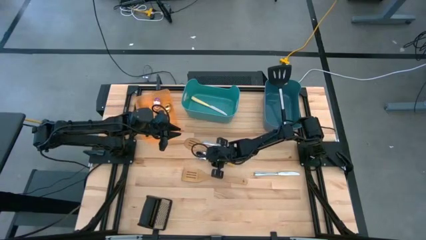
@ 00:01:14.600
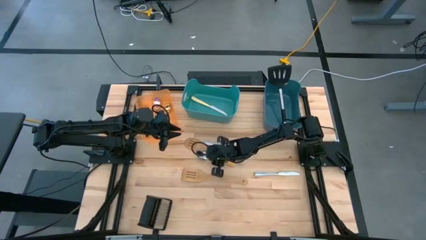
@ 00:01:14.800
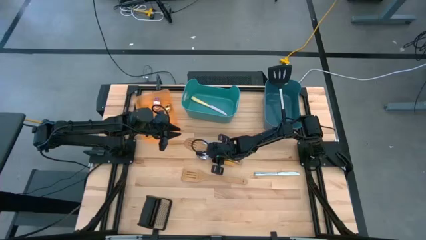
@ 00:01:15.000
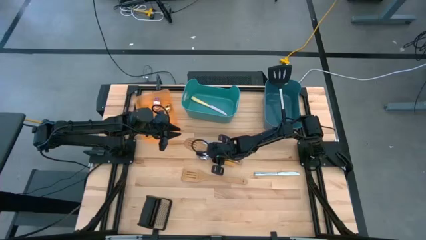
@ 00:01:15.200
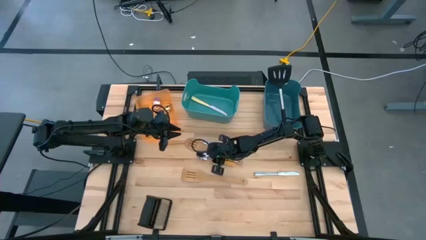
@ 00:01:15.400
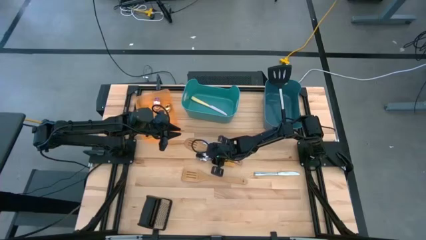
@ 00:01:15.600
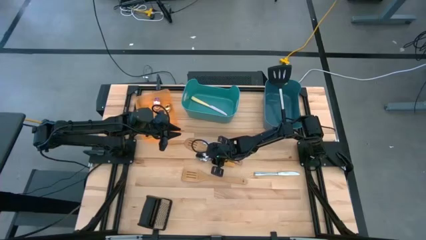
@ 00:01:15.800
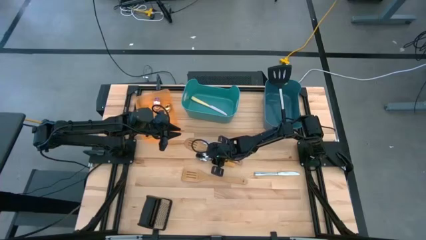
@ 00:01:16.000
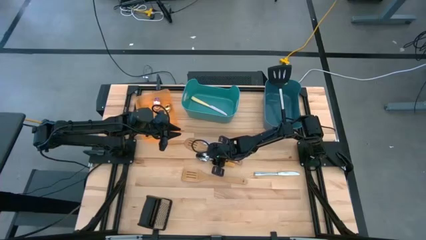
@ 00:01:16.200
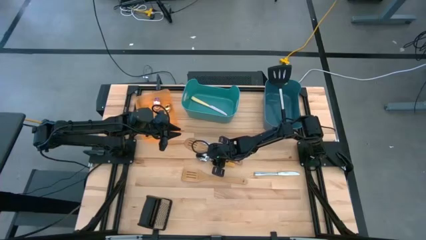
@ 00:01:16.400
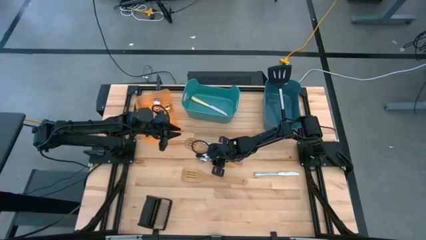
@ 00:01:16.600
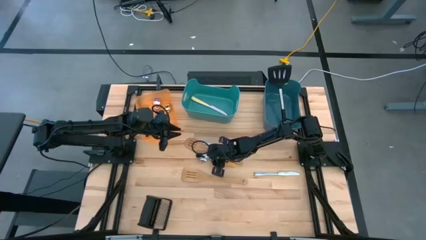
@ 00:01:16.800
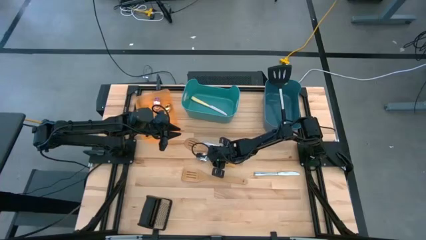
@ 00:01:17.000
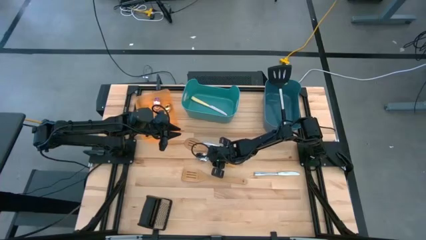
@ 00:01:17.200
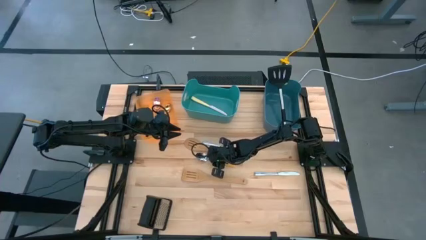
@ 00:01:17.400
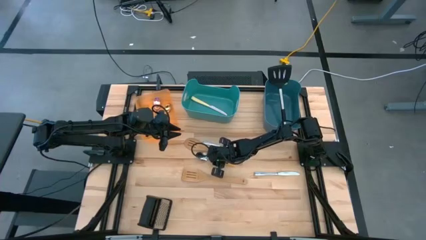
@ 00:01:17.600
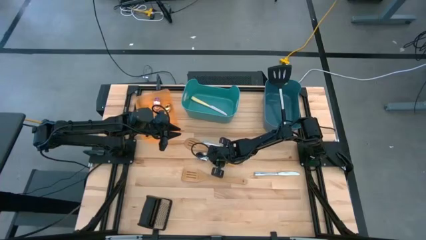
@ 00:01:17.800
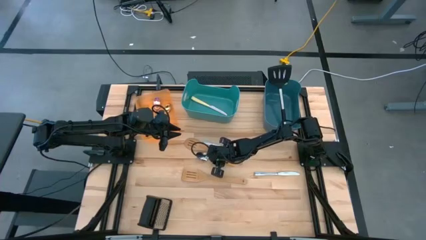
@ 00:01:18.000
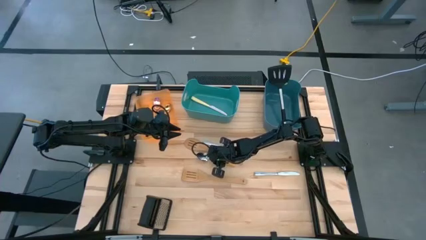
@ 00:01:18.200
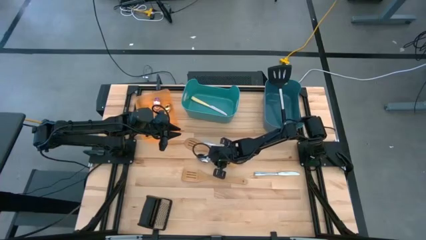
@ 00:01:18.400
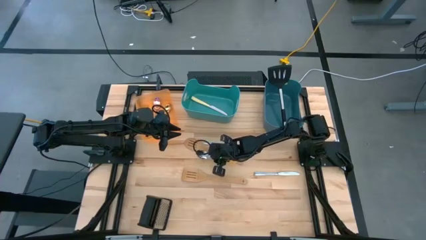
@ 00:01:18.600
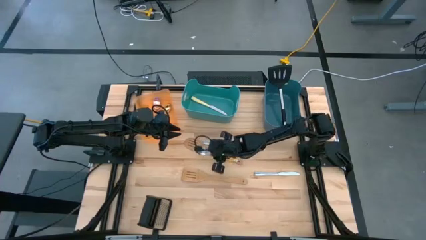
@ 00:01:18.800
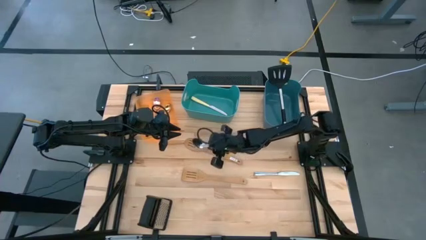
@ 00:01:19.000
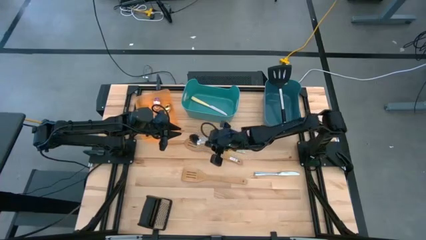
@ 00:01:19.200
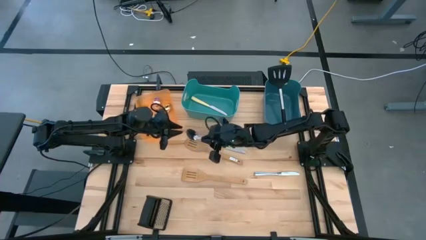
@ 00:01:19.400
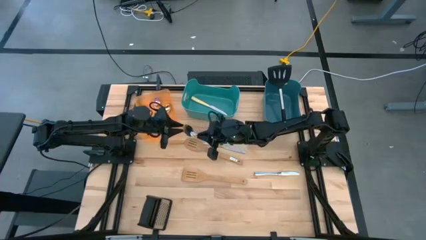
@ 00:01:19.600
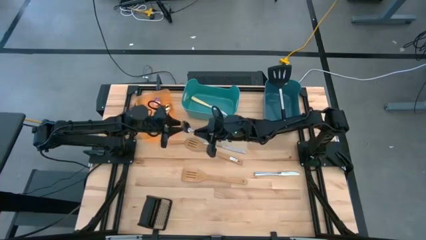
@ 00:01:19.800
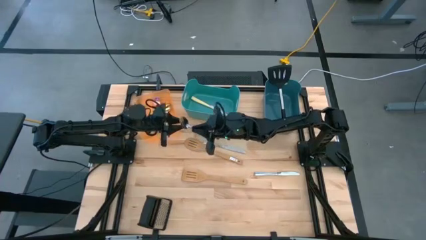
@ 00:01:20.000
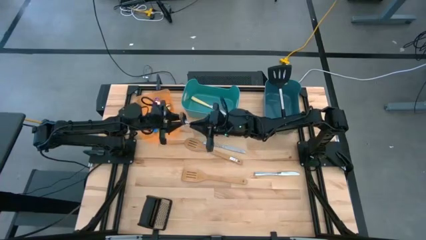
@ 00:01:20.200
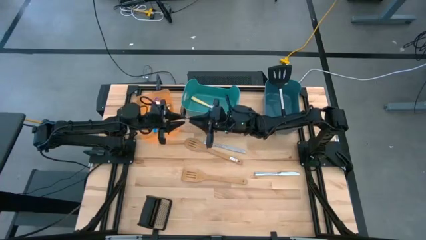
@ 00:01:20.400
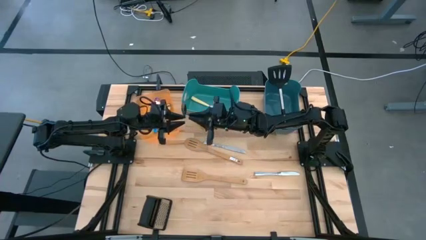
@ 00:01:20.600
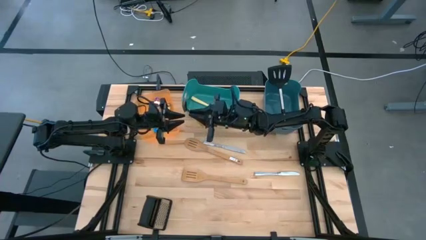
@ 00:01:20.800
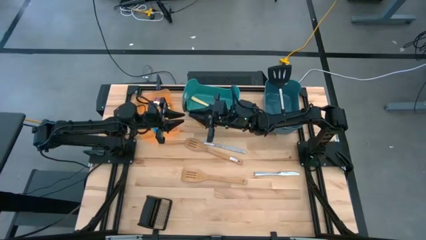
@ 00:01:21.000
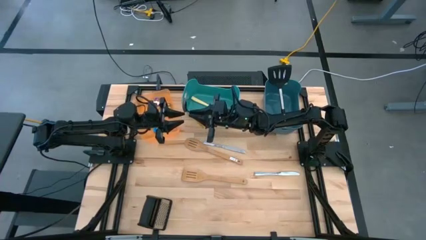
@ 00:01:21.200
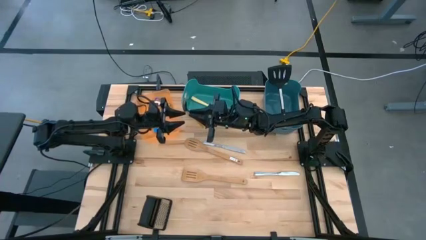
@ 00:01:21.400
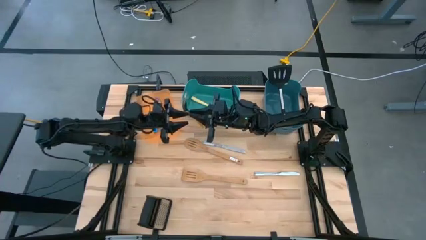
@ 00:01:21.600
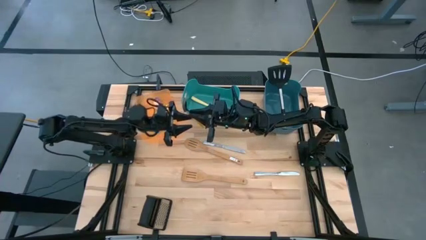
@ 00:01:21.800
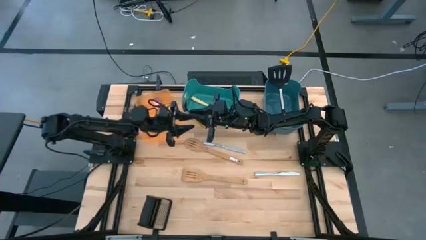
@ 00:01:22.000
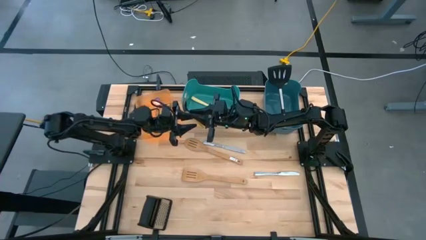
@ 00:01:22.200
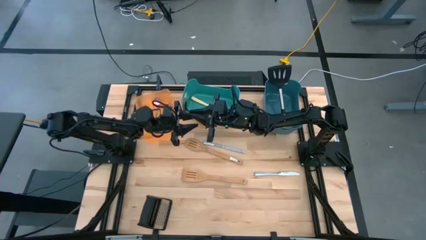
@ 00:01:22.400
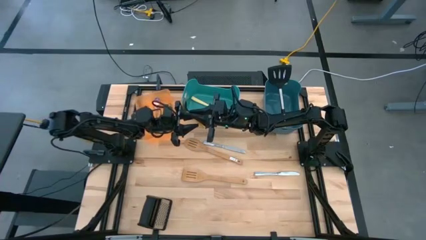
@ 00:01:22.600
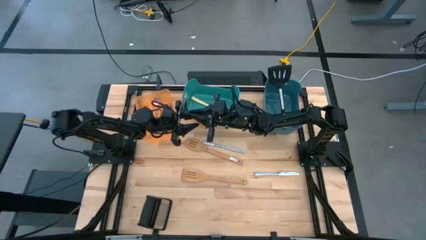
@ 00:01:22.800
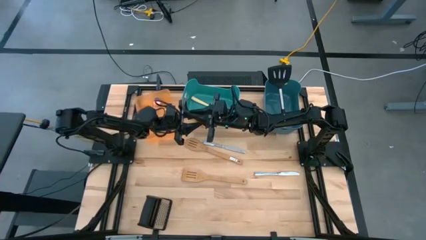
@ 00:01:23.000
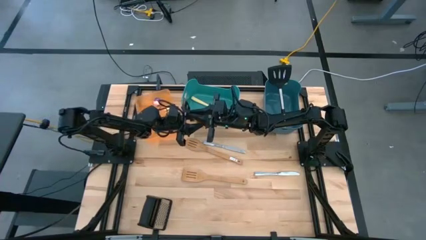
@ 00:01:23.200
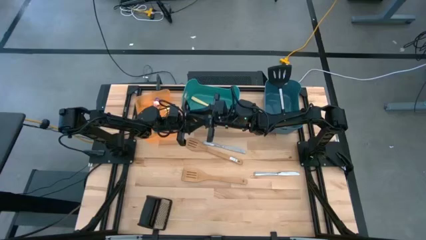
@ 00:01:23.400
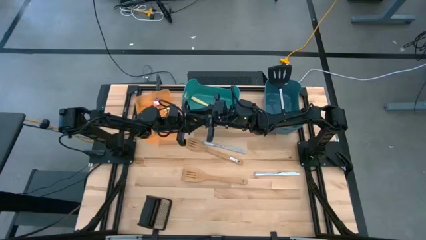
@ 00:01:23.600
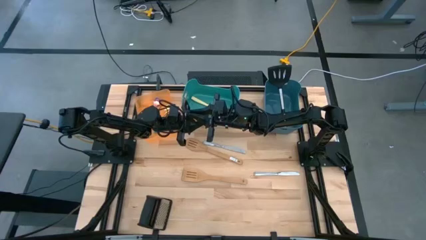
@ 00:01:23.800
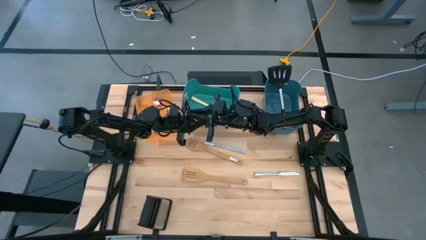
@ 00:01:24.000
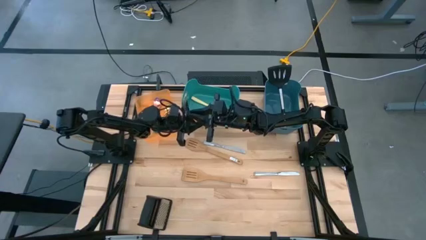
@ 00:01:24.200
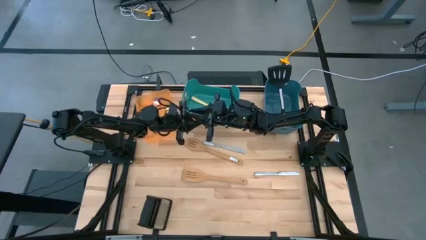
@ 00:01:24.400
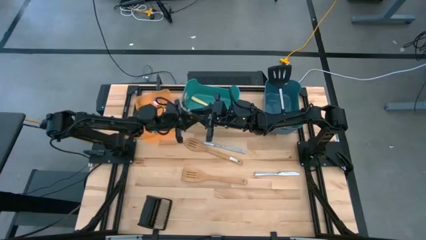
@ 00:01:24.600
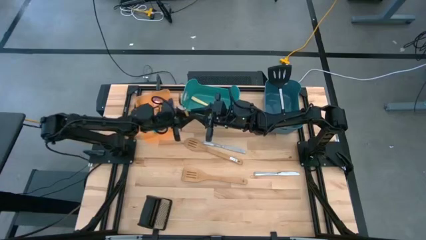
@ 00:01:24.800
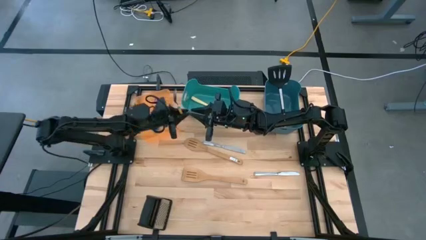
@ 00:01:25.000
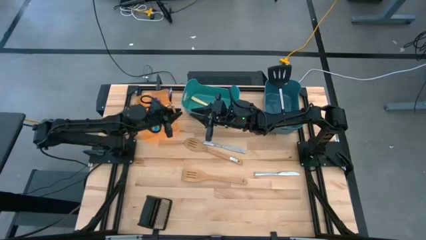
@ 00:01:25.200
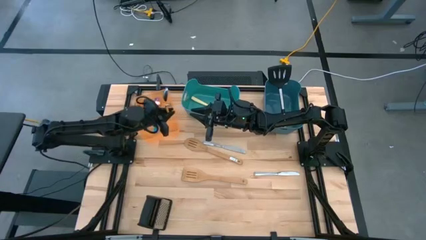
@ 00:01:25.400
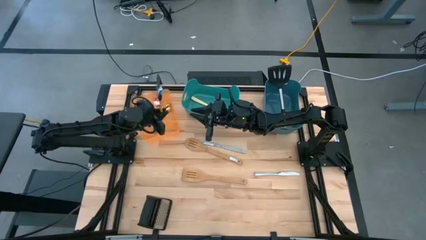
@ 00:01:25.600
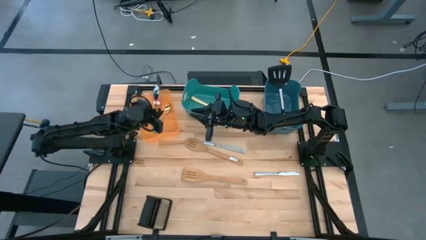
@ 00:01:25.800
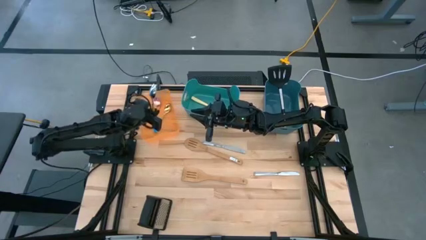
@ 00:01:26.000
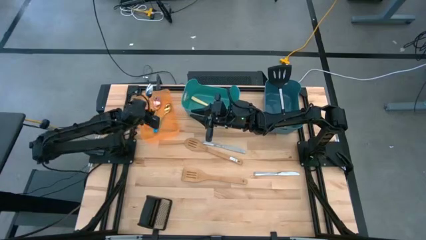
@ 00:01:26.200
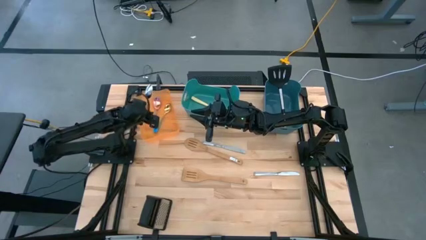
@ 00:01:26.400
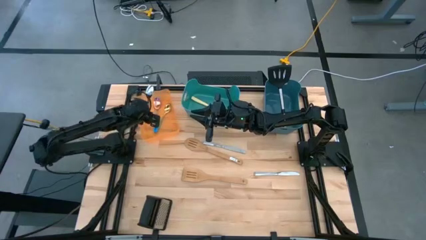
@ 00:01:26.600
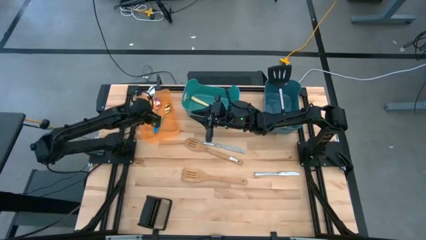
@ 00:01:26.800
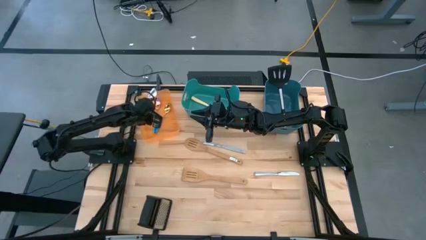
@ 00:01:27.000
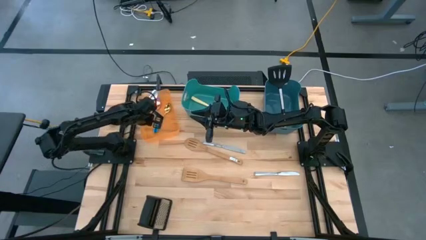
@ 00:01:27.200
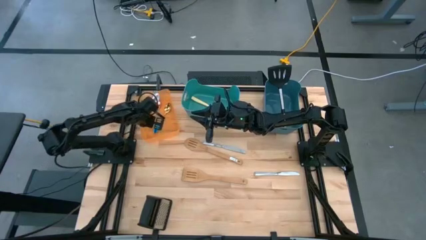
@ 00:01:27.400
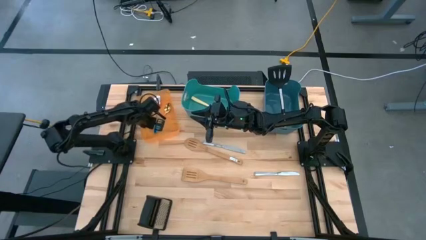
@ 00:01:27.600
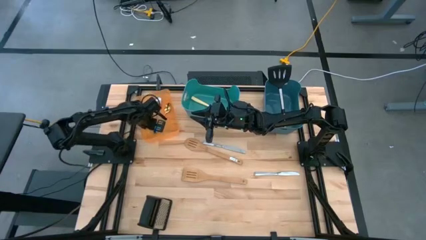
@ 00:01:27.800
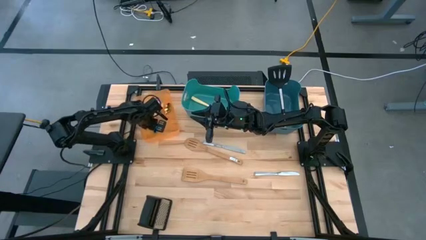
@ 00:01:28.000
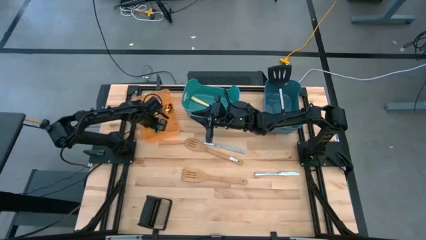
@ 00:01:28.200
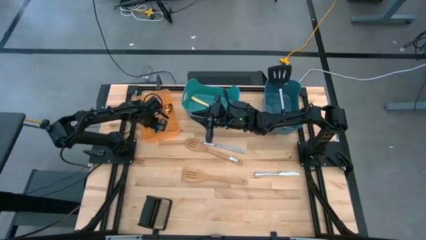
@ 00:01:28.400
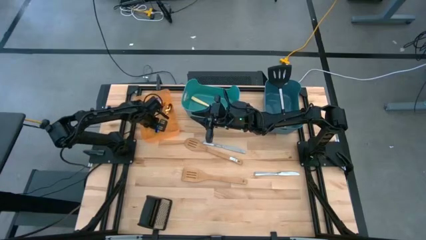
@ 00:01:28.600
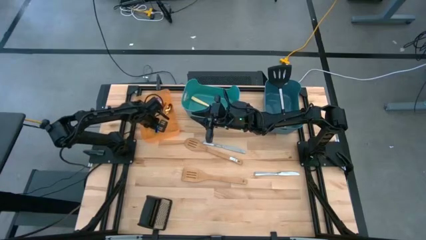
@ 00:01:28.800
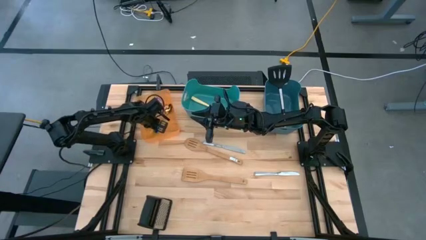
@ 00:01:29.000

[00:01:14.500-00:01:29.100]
Task: Pick & Place Kitchen Items
Put the yellow spoon into the orange bin
